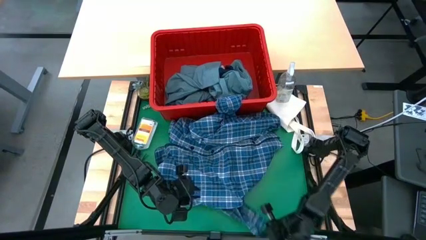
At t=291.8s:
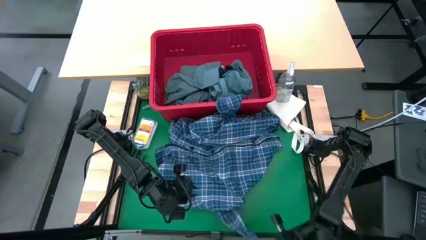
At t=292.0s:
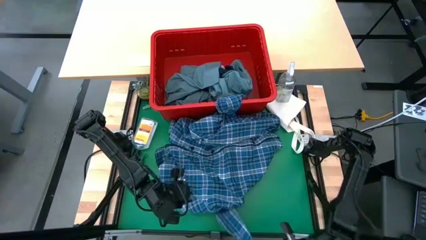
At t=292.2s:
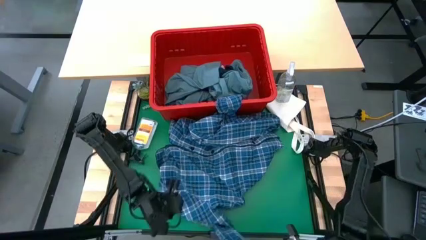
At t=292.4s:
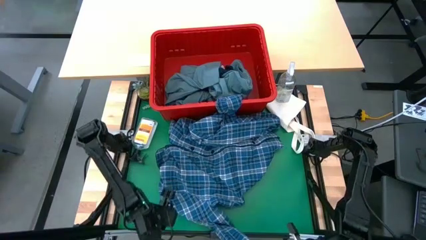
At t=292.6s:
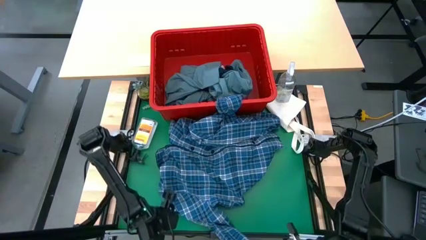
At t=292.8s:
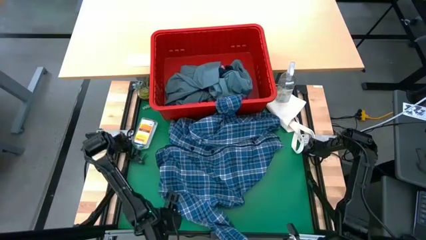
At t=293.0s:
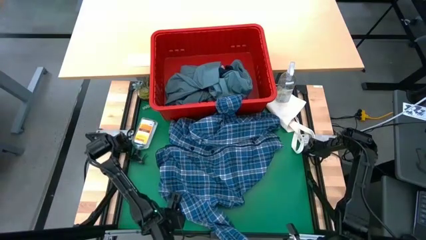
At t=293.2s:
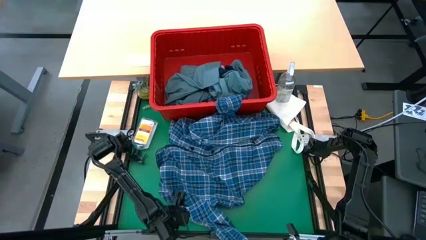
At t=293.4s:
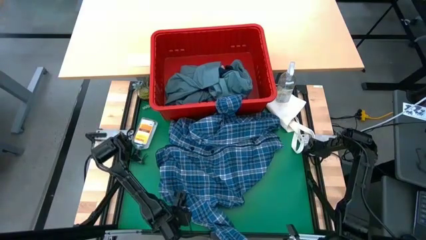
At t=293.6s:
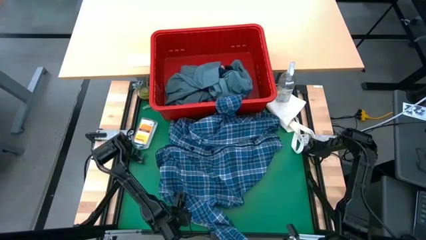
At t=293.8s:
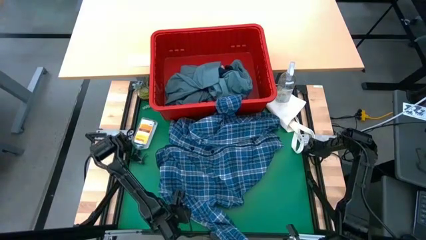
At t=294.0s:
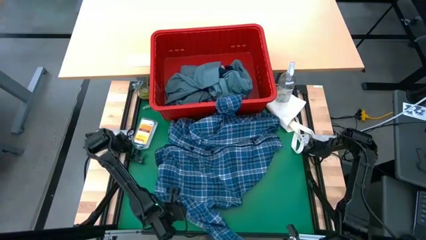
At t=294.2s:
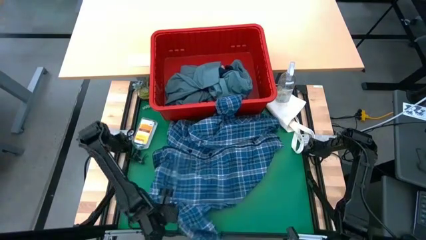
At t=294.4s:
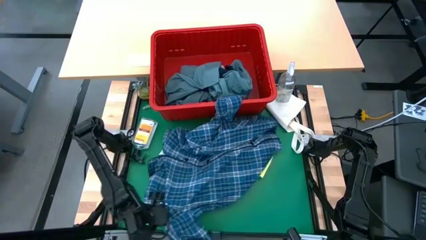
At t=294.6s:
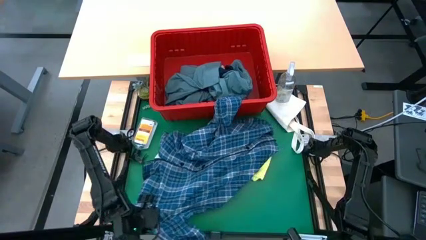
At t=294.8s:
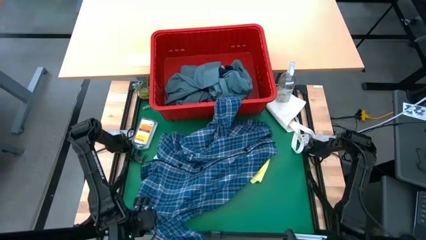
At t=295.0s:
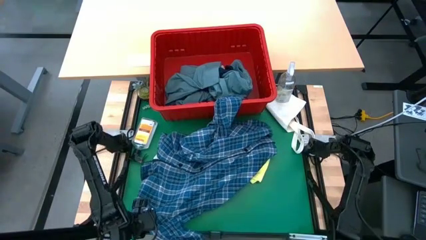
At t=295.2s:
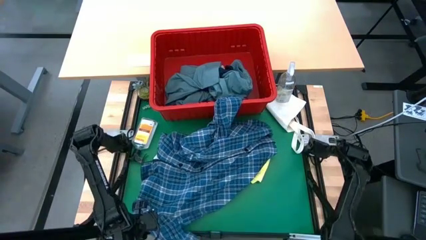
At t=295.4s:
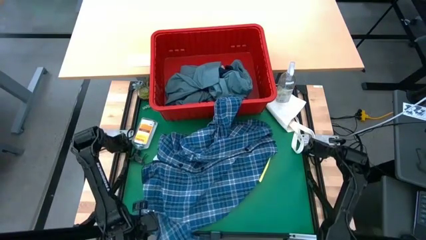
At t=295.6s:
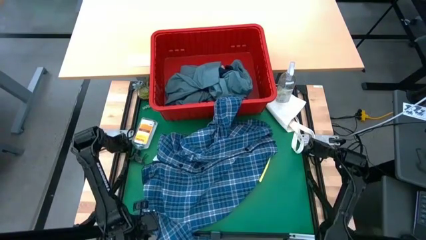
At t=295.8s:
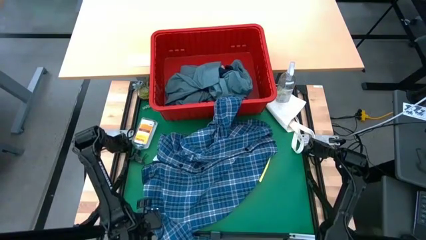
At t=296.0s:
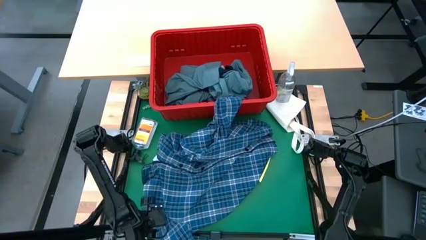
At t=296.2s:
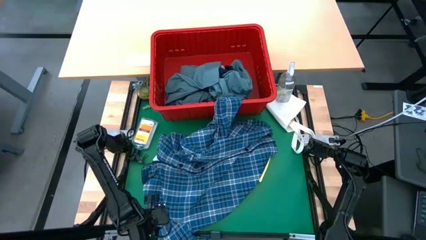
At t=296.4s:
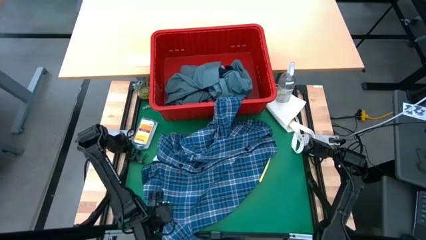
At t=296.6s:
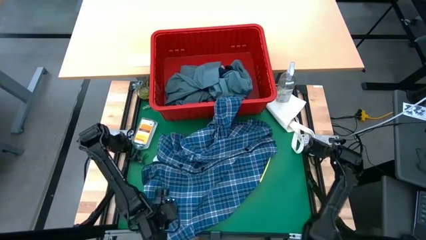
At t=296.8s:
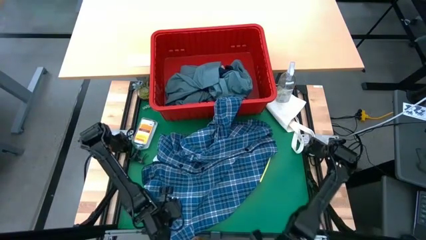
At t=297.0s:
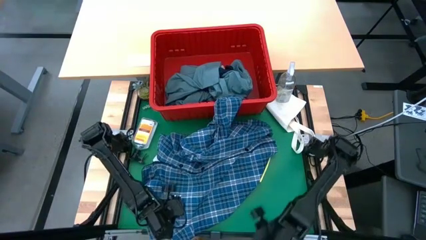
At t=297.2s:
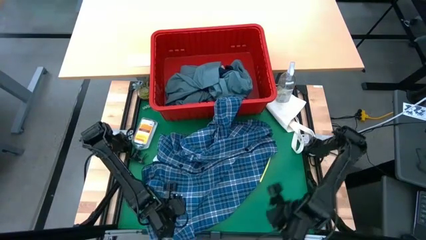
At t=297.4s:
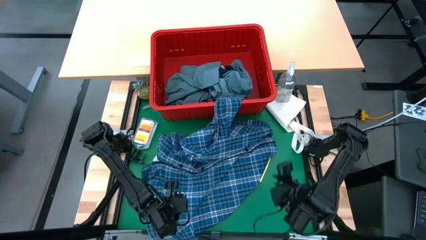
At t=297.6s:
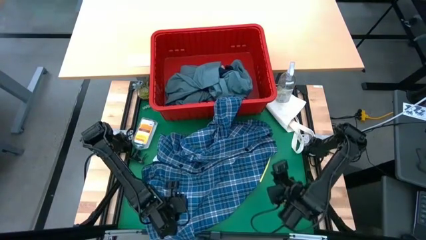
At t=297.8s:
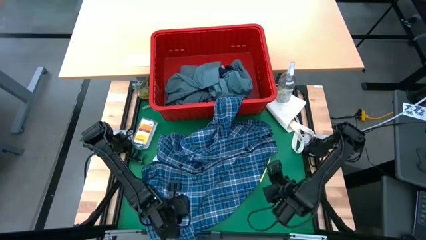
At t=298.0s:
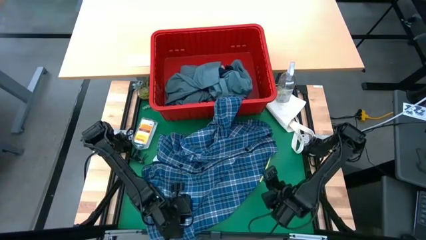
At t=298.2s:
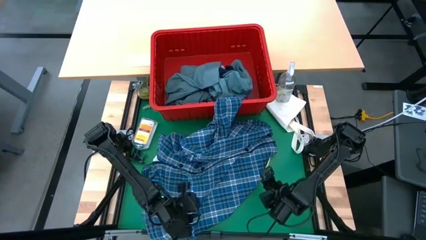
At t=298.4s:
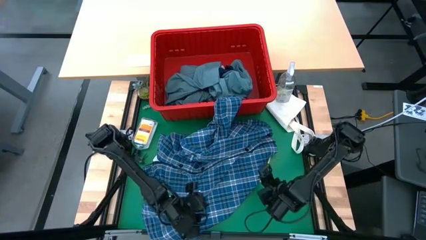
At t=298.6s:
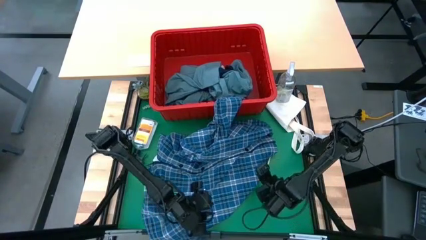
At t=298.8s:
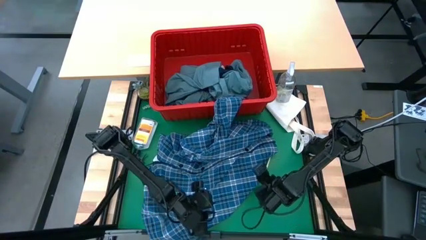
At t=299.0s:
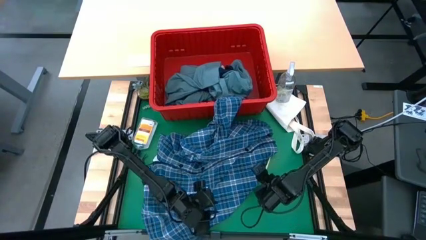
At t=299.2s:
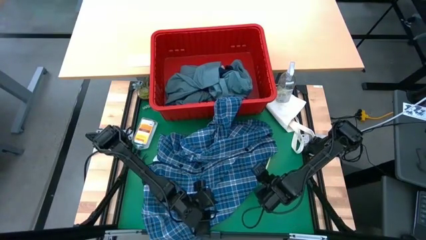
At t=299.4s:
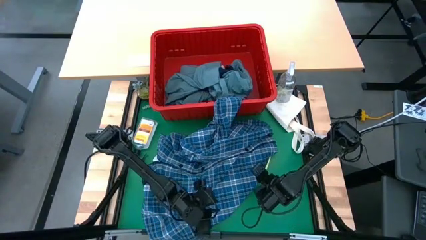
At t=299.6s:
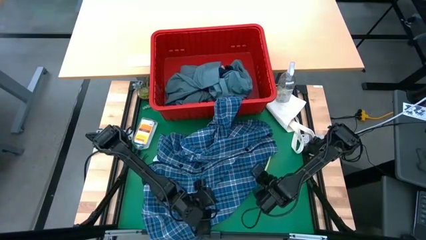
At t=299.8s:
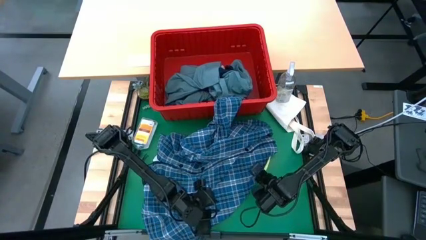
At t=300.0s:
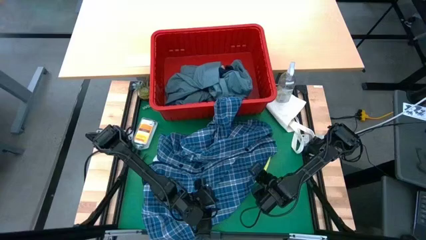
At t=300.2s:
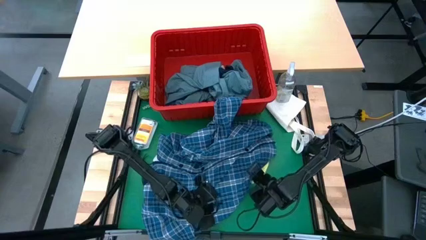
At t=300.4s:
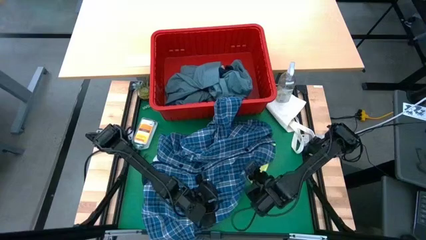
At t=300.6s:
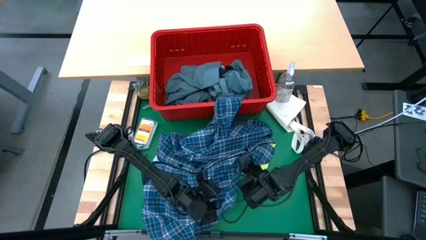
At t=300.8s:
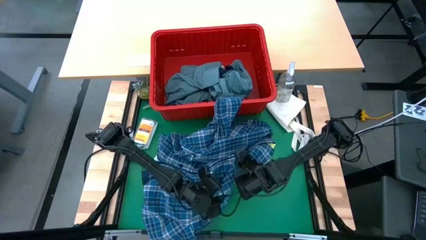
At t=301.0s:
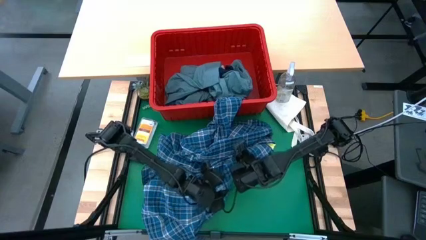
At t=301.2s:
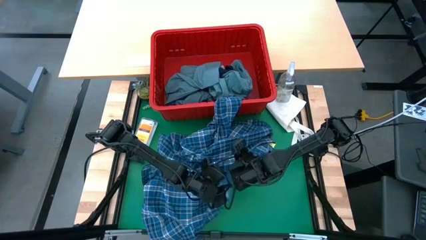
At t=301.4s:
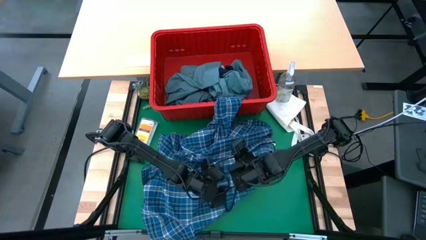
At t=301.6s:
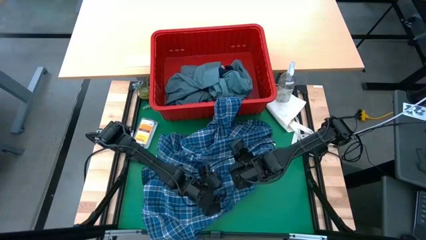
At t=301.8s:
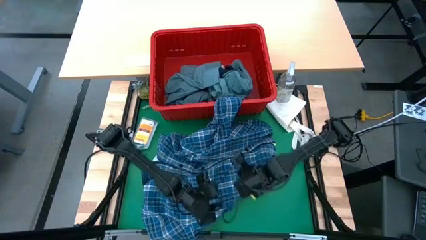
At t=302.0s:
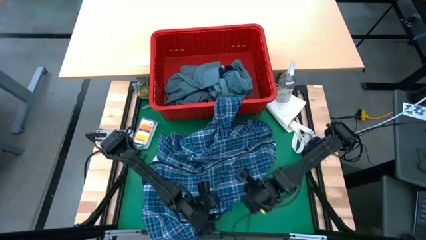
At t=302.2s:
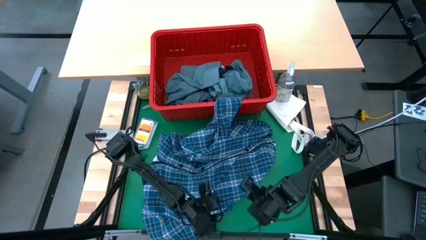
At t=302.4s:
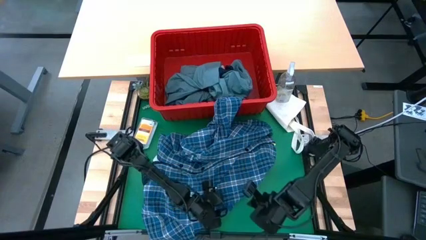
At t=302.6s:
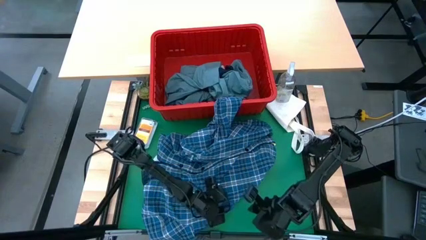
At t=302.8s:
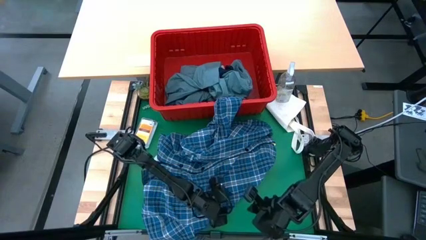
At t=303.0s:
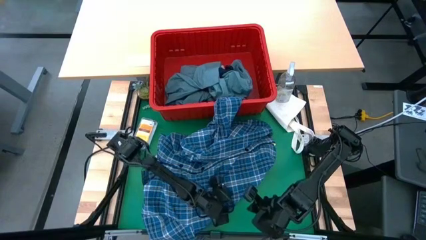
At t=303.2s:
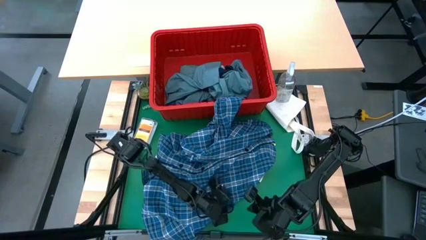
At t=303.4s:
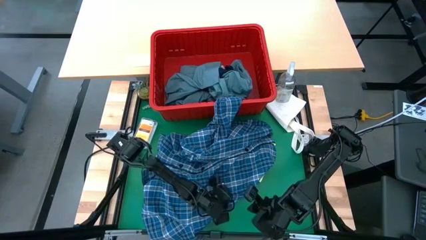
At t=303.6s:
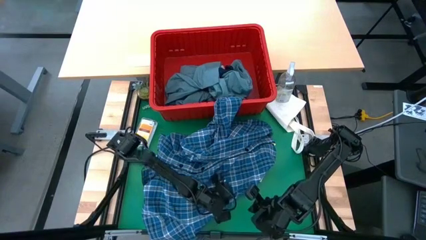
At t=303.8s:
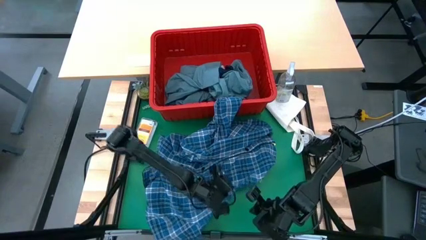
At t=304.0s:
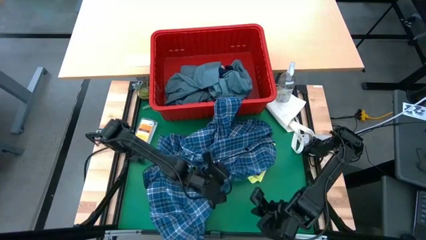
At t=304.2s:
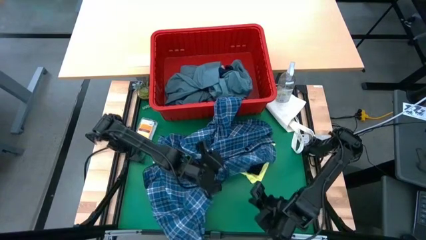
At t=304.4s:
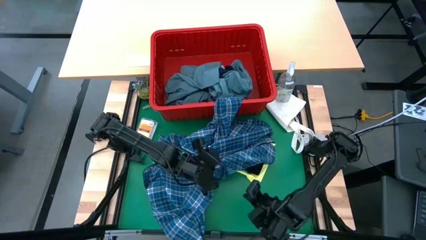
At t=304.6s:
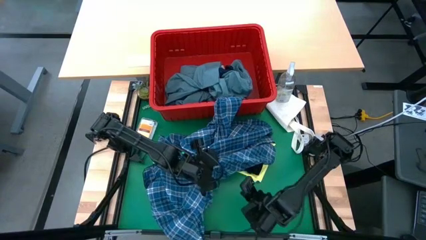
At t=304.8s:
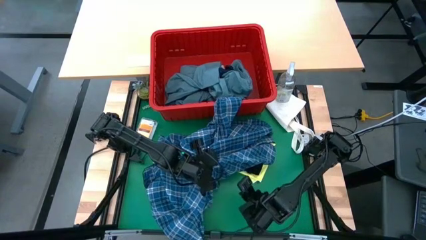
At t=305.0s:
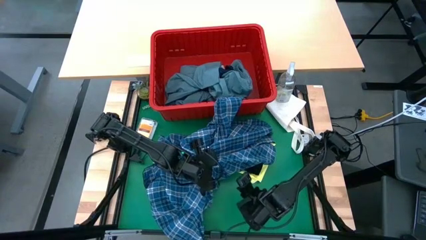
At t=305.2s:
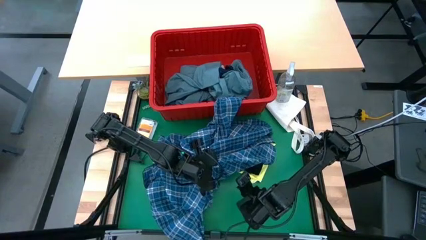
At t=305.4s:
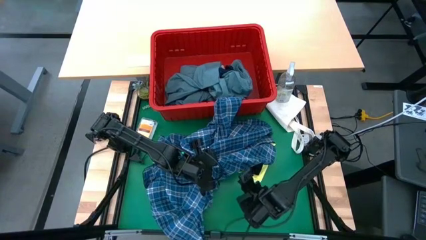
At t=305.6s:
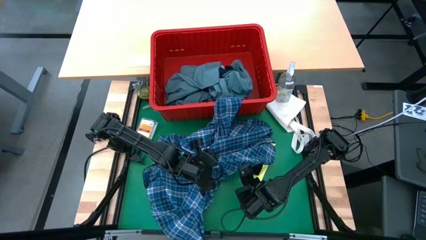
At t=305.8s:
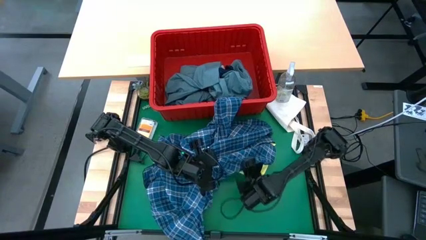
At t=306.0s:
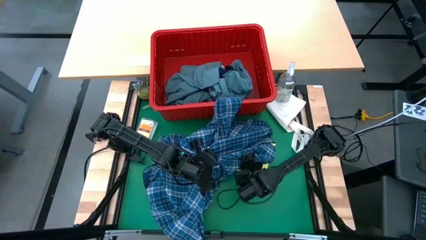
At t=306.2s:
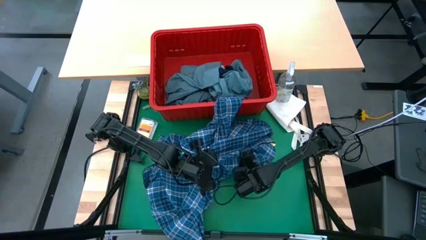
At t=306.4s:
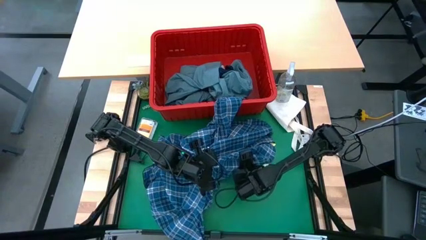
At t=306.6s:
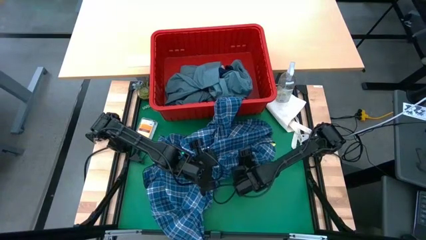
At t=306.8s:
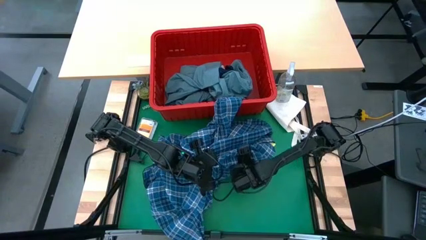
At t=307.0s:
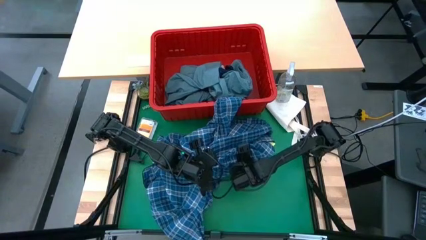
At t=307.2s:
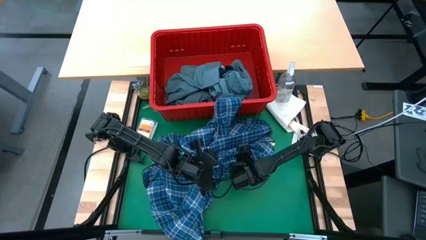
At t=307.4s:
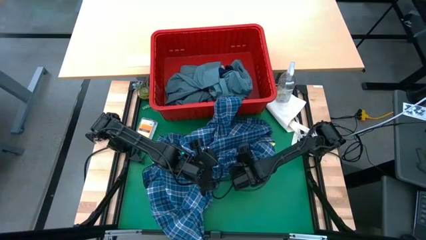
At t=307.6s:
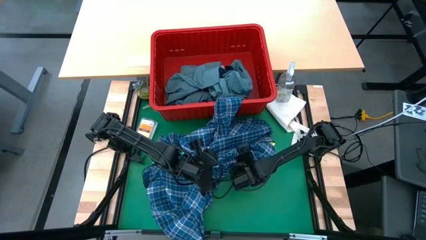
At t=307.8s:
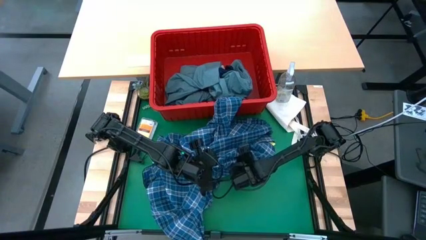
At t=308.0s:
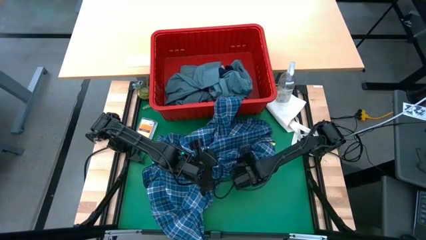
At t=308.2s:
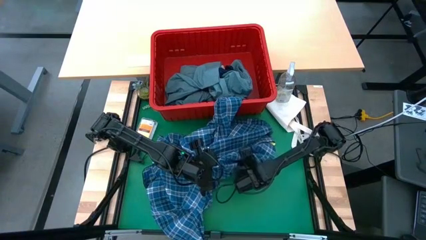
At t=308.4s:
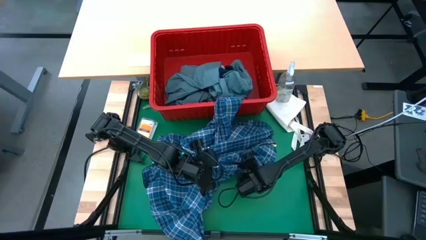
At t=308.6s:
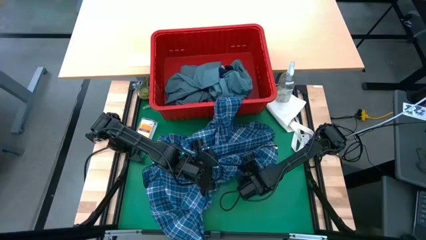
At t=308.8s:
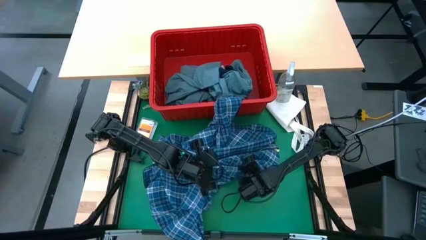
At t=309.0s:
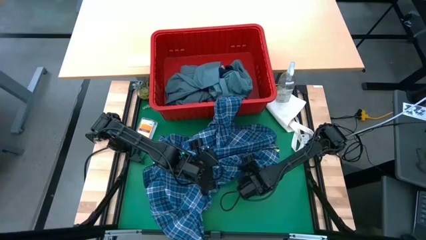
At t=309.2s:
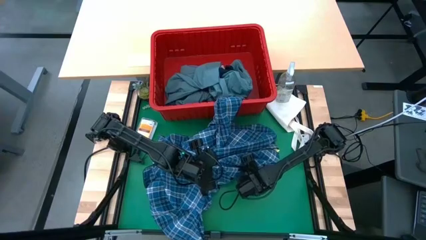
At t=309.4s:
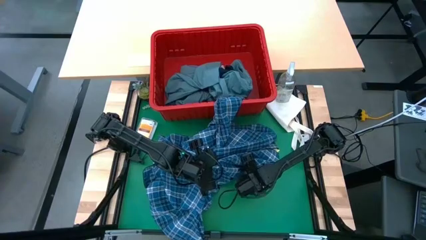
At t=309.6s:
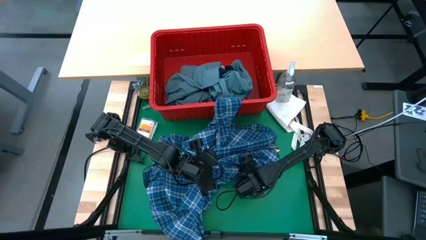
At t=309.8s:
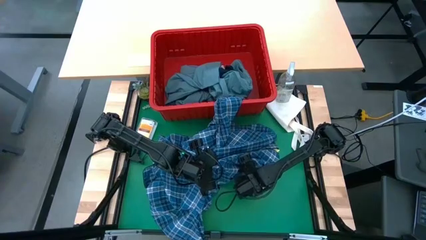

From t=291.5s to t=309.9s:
Task: Fold Laundry from Bin
Fold the blue shirt
